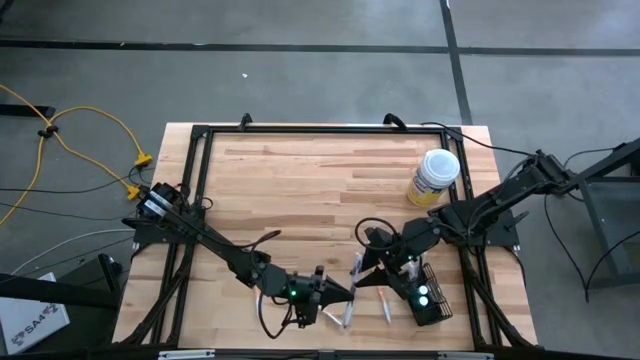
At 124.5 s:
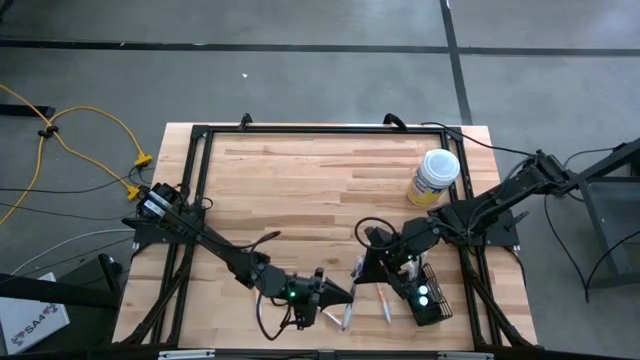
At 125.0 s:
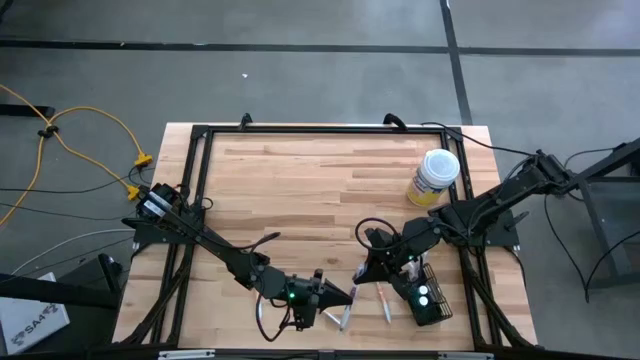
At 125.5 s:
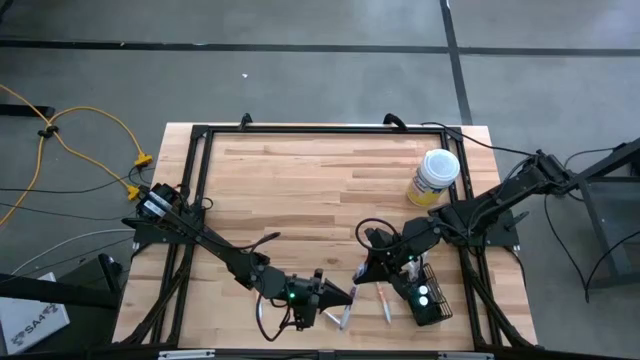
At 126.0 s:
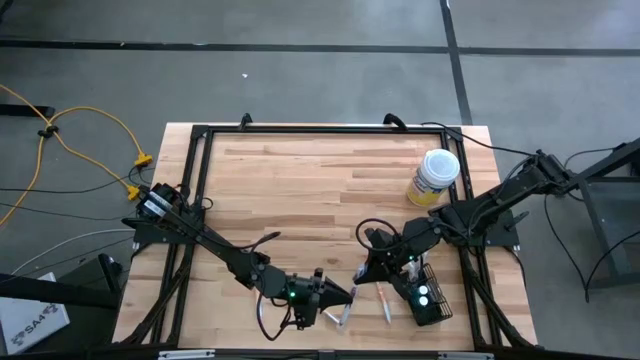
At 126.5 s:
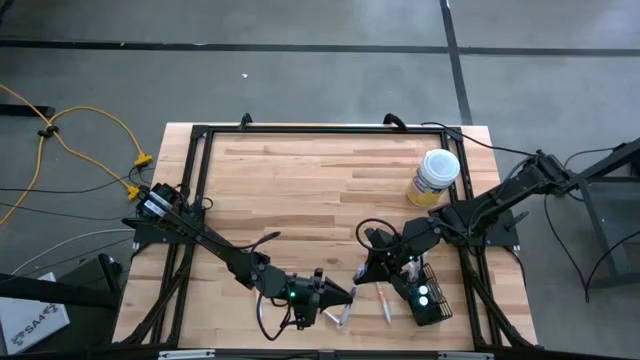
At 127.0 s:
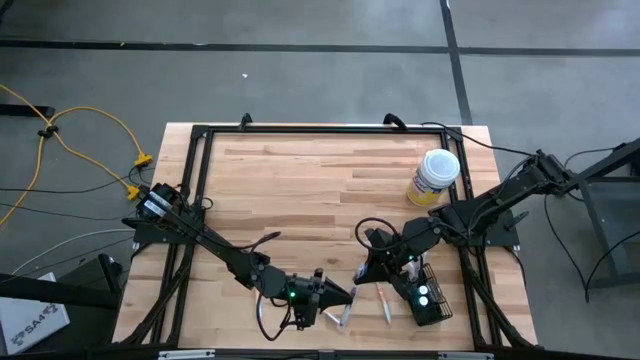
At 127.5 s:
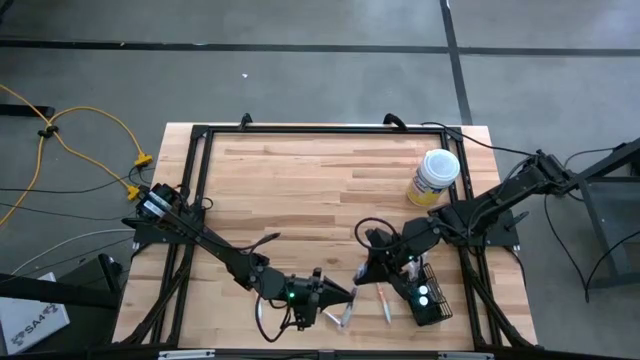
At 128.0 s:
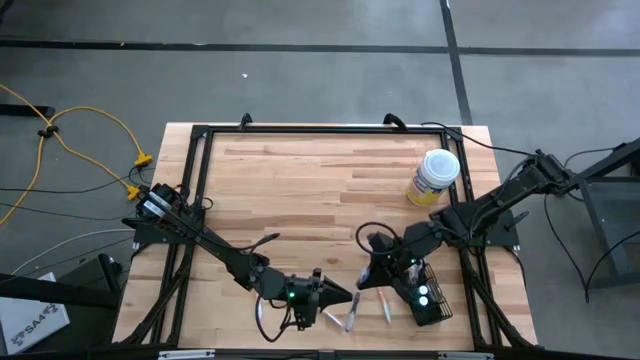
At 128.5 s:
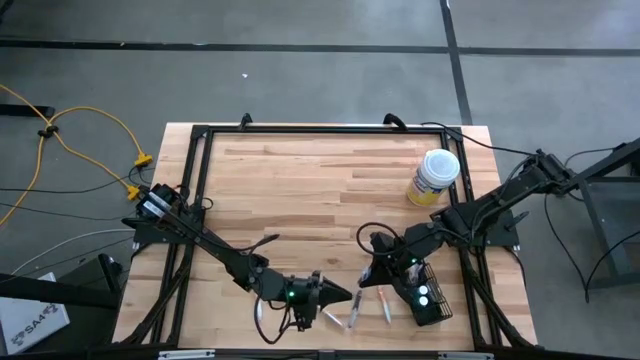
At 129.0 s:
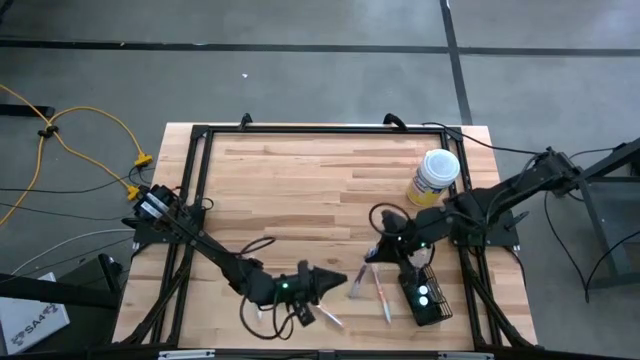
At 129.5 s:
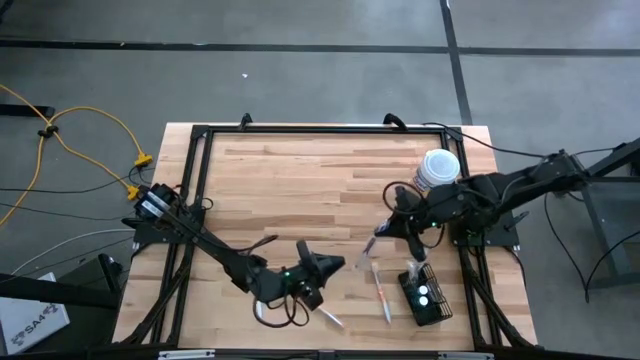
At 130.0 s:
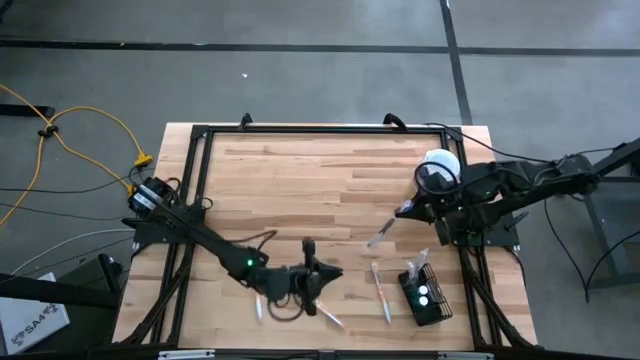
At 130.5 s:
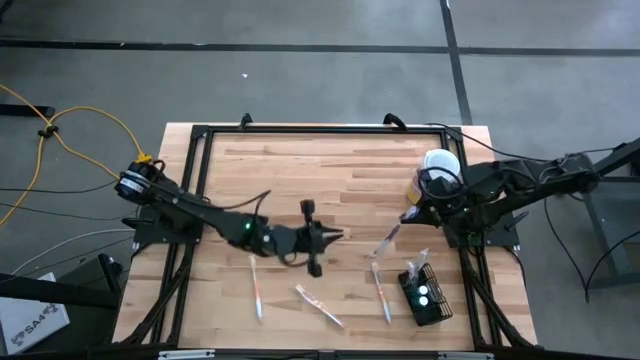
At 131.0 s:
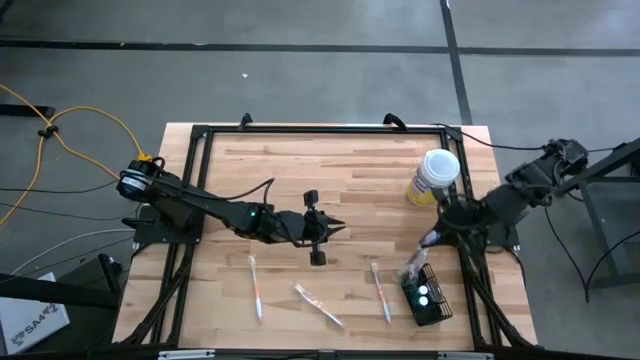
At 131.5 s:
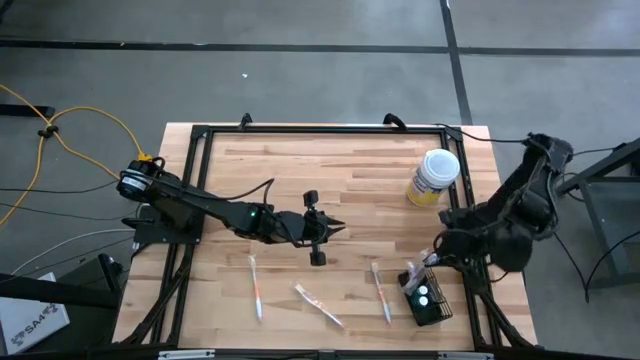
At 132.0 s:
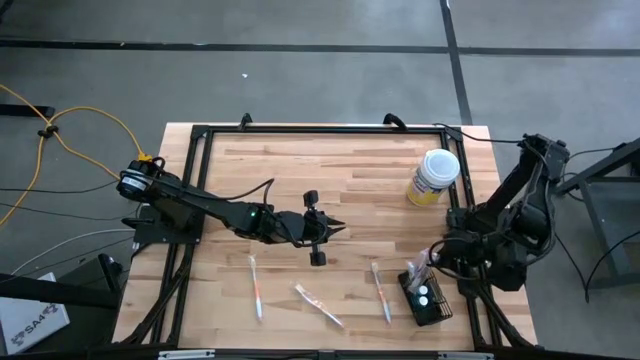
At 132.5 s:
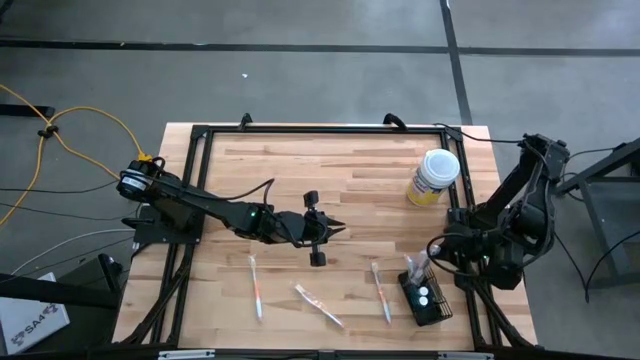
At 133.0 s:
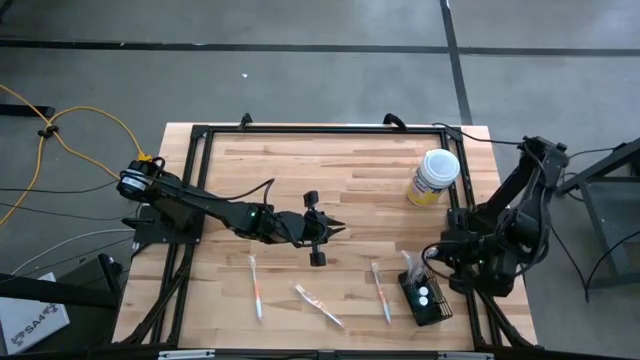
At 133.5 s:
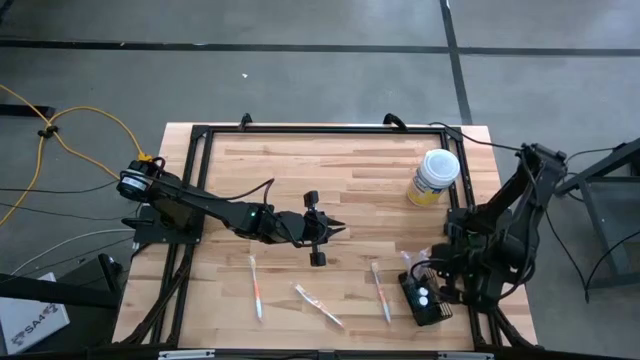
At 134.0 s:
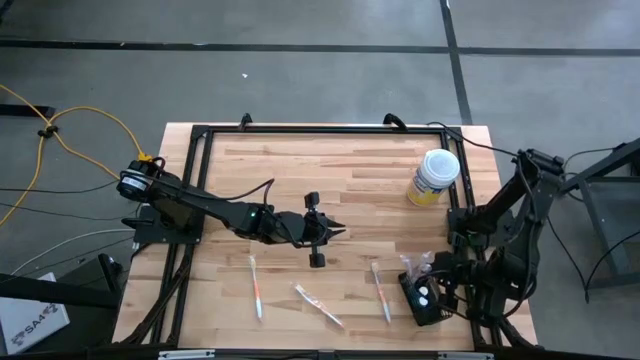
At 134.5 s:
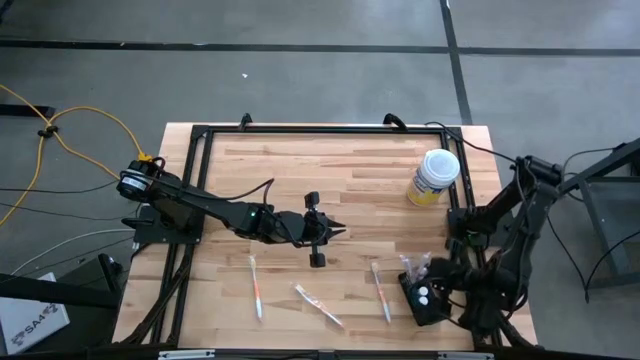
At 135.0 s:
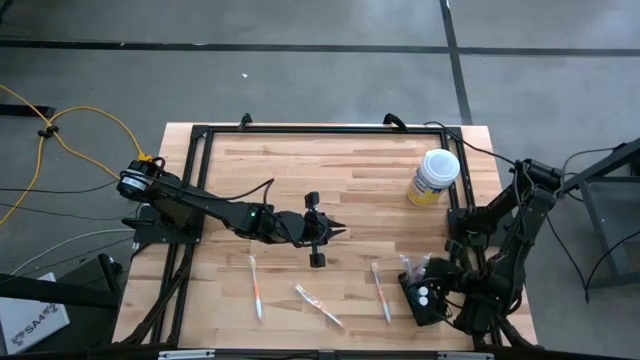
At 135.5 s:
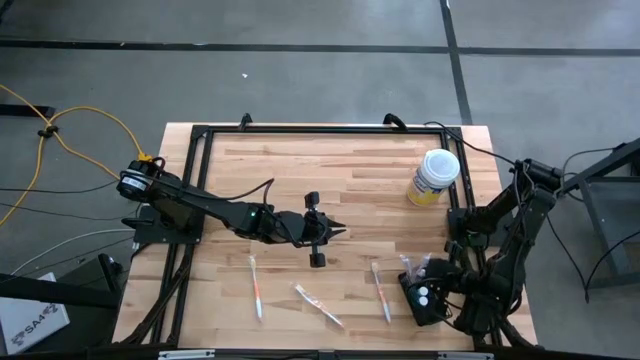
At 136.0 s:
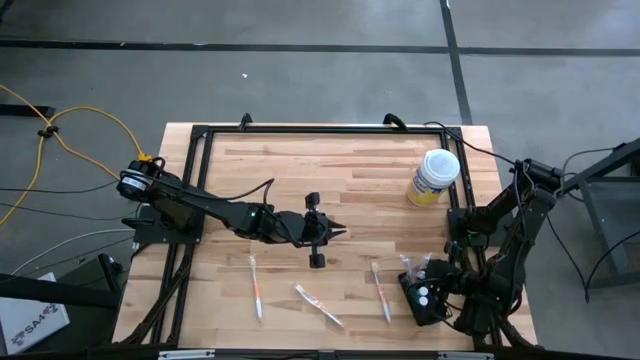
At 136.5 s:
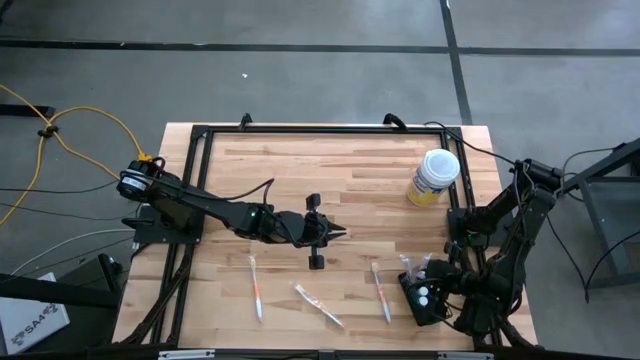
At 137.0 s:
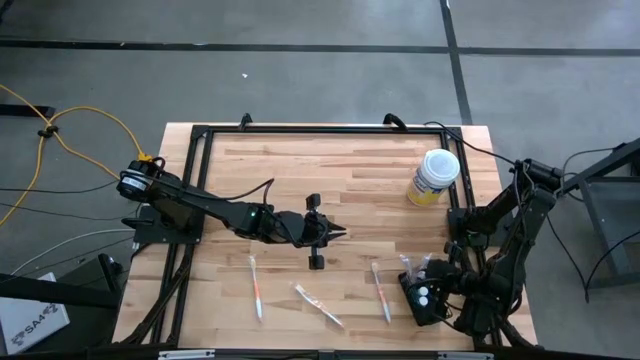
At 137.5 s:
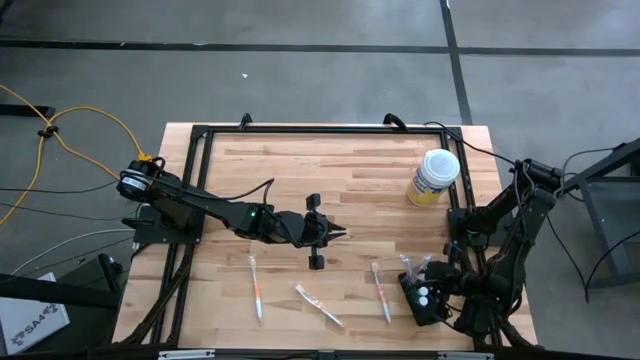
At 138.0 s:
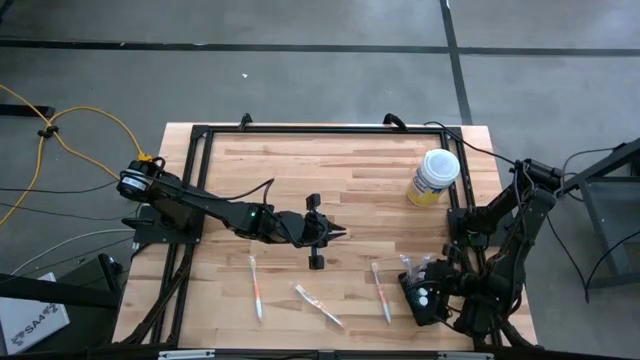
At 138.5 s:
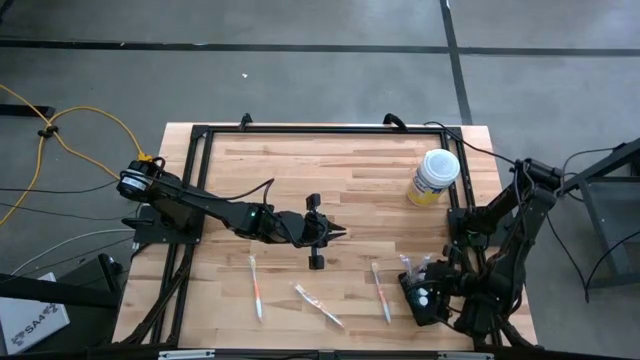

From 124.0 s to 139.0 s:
Task: Pick & Place toothbrushing station
Put the purple toothbrush into the mesh organizer
